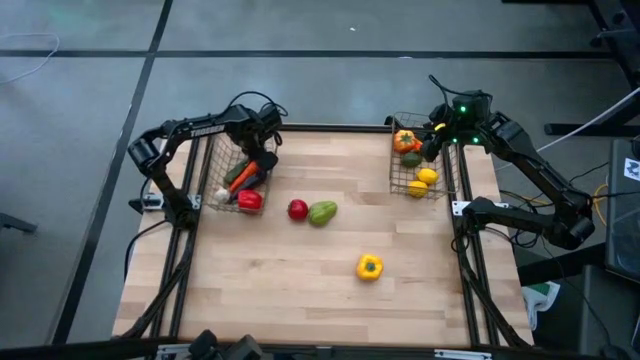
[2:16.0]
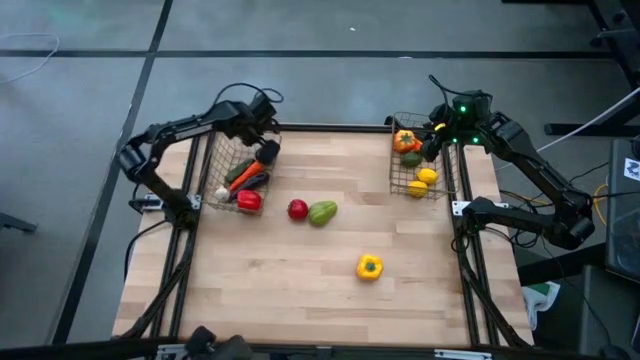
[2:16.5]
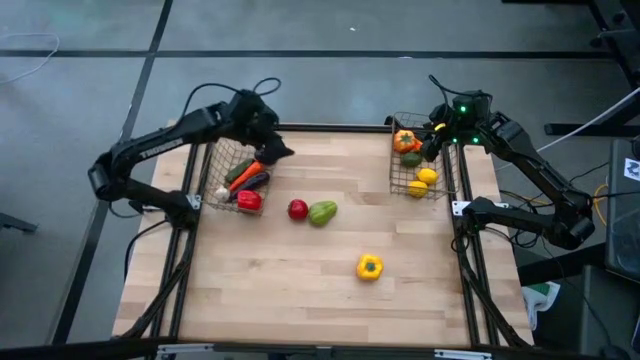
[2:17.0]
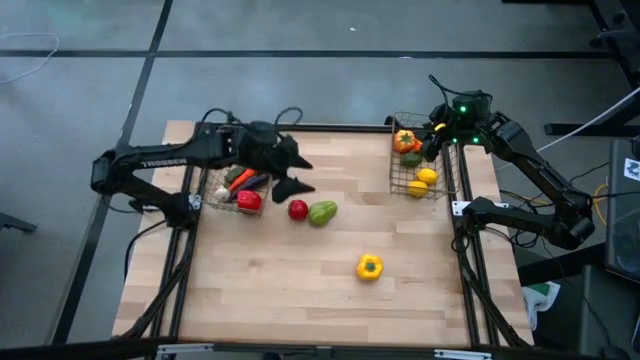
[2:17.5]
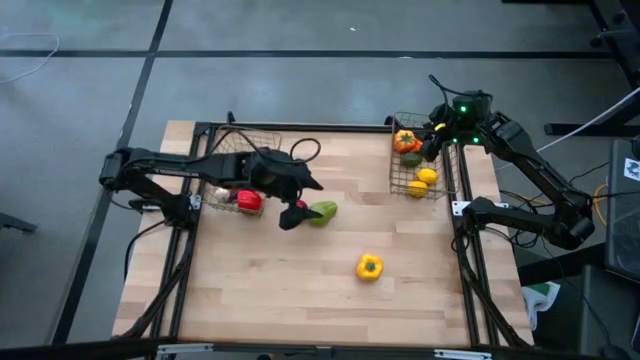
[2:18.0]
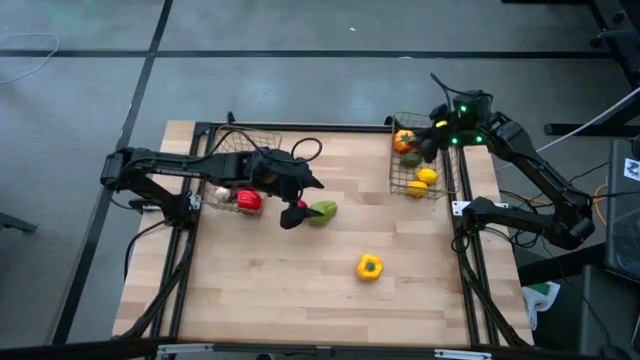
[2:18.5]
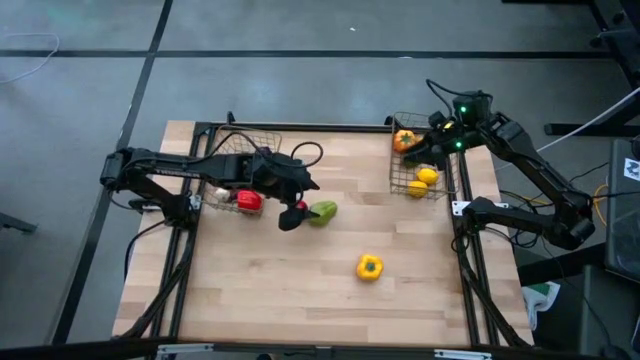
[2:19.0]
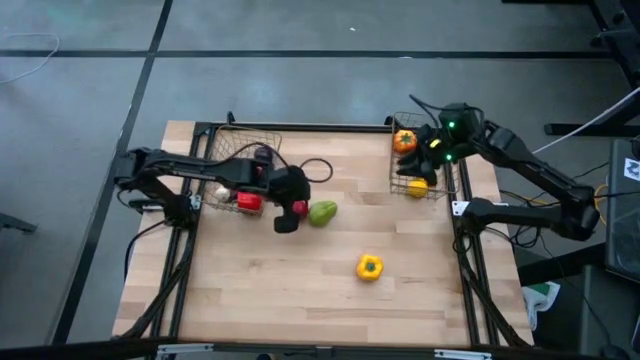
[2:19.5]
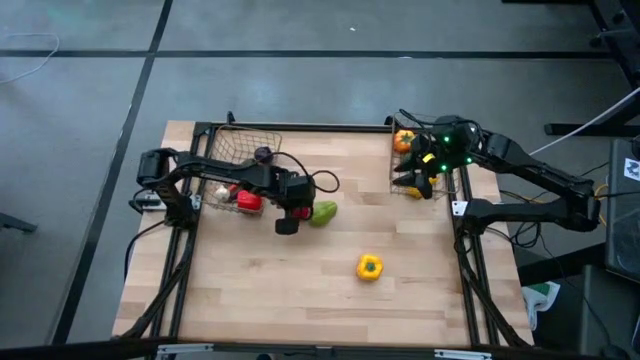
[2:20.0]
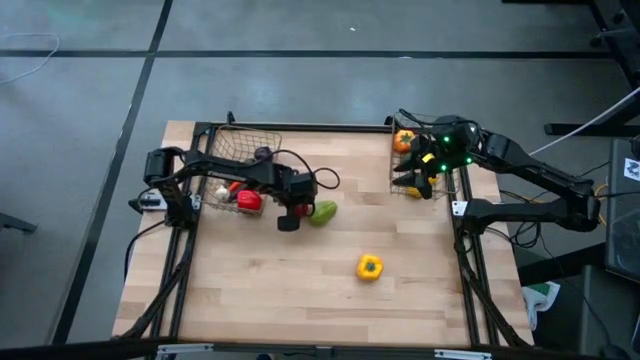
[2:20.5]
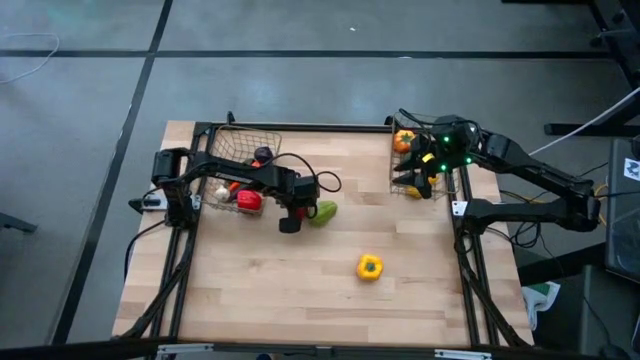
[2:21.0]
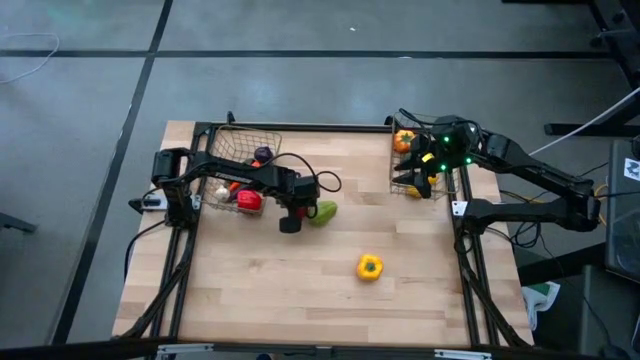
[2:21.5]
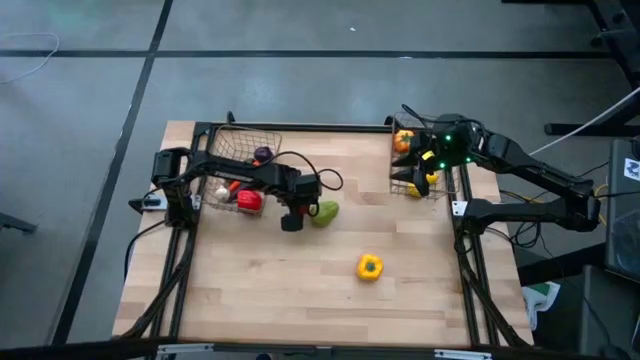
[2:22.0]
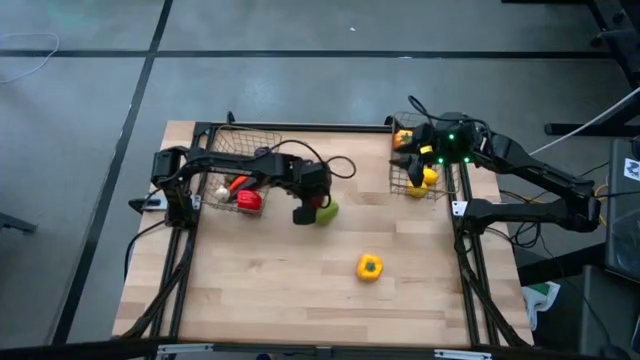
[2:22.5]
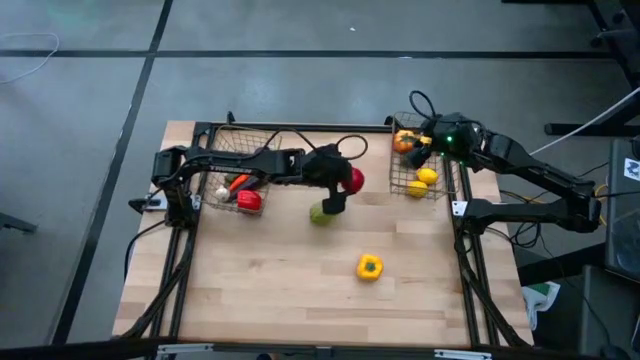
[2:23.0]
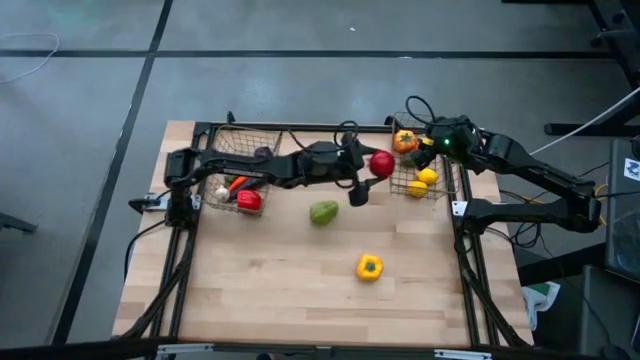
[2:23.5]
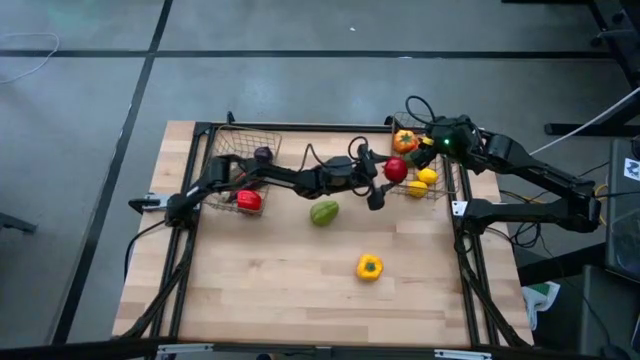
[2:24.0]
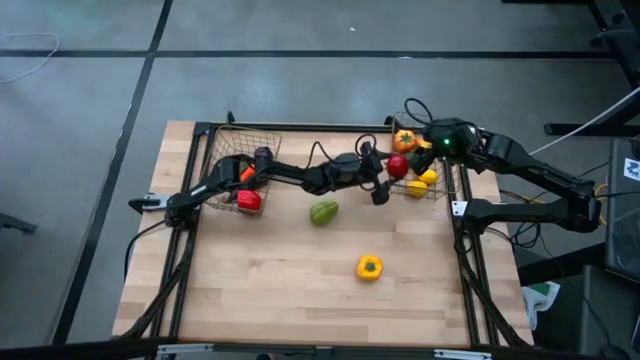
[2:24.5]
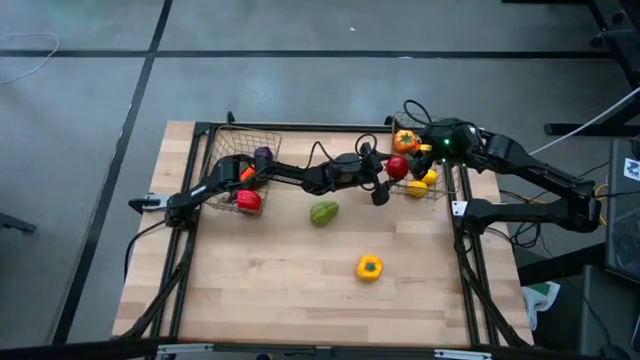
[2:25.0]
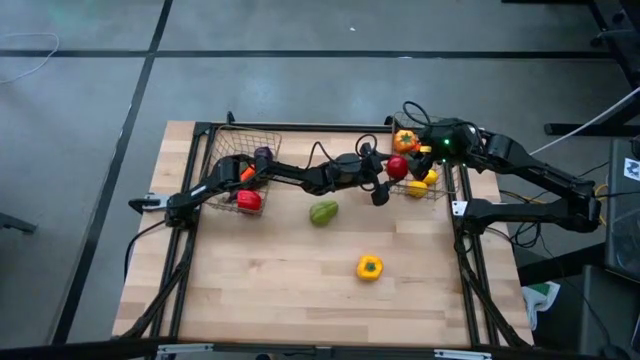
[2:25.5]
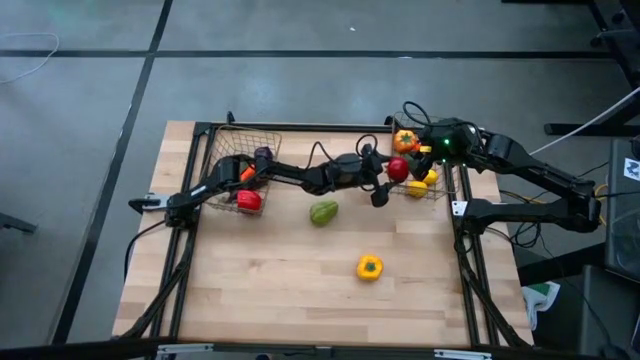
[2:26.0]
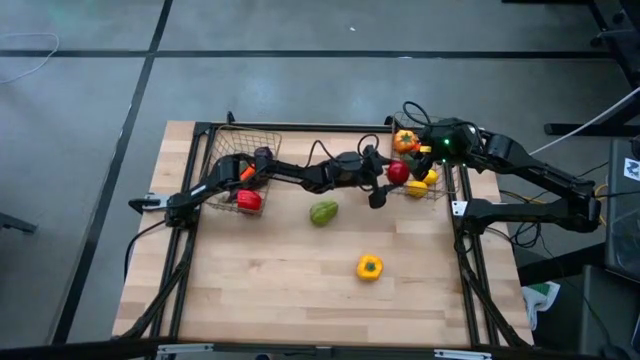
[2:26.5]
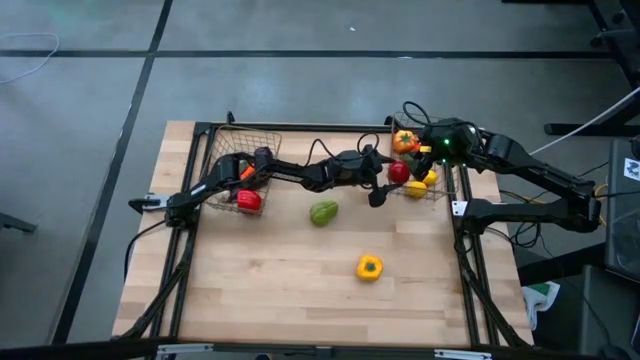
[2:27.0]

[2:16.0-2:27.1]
Task: Sort produce into baskets
Put the red tomato into the right gold wire basket

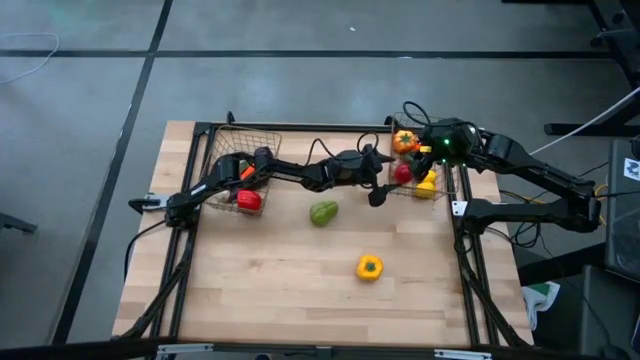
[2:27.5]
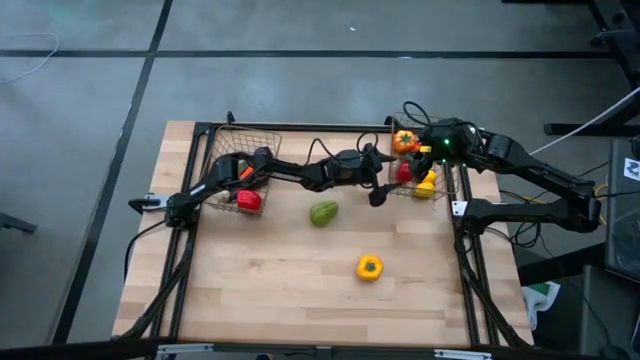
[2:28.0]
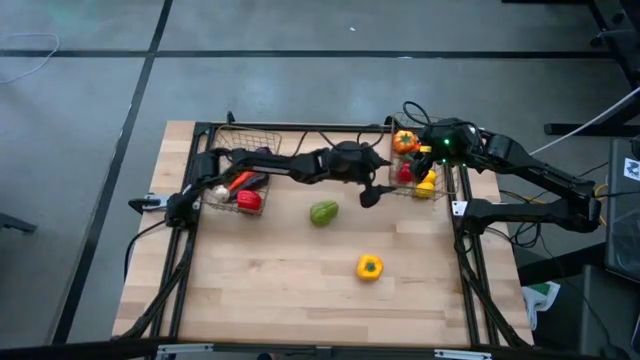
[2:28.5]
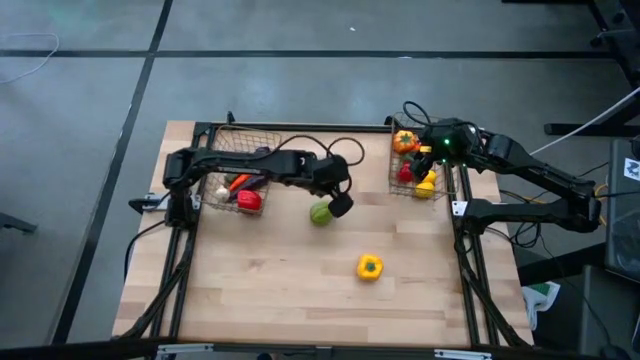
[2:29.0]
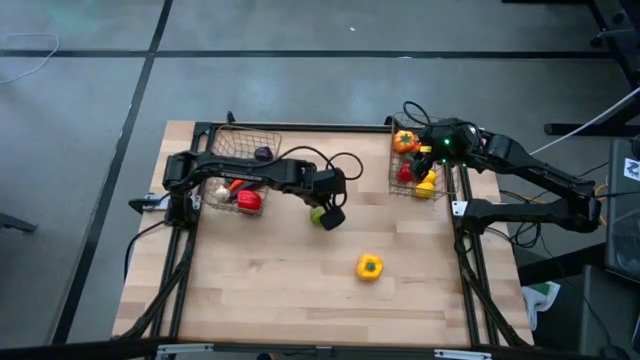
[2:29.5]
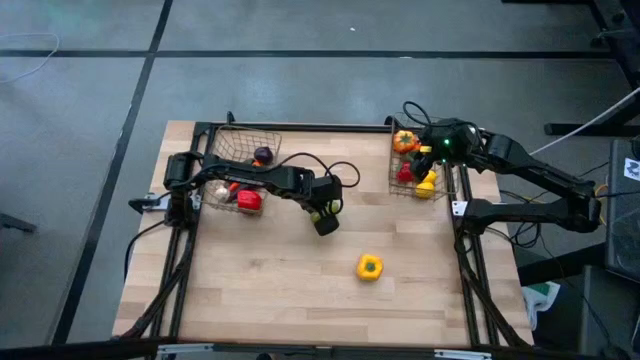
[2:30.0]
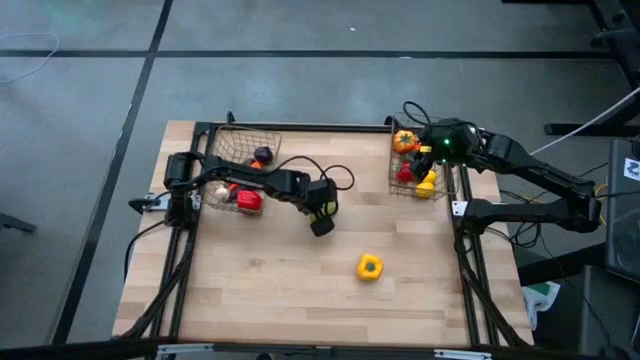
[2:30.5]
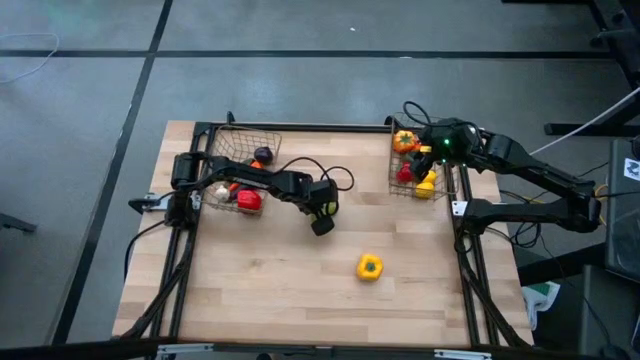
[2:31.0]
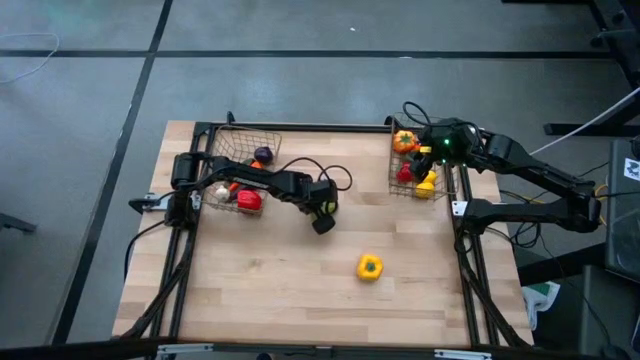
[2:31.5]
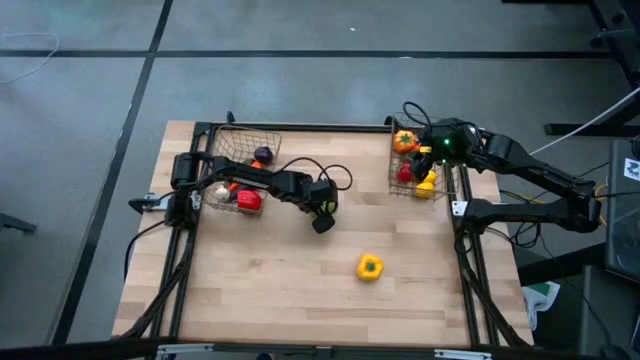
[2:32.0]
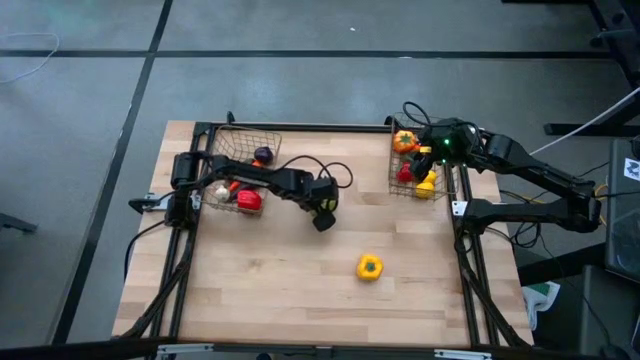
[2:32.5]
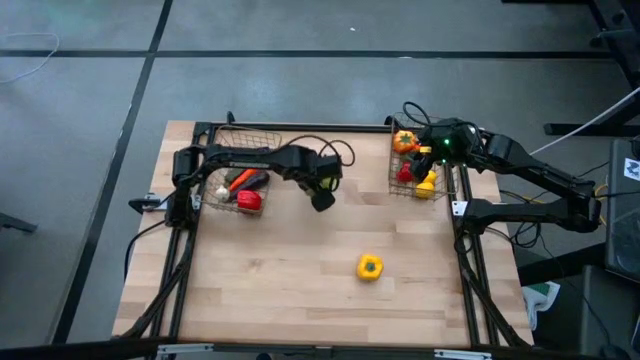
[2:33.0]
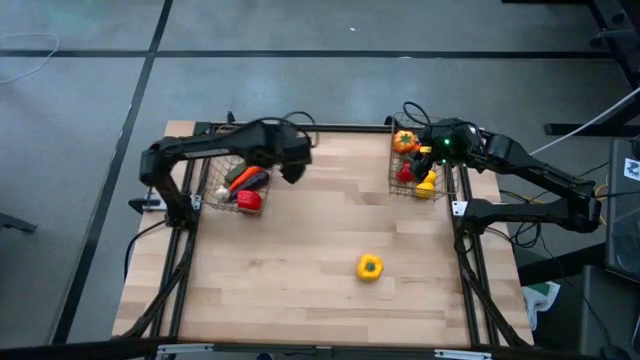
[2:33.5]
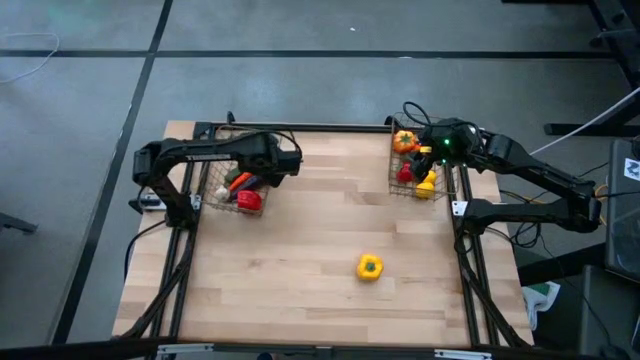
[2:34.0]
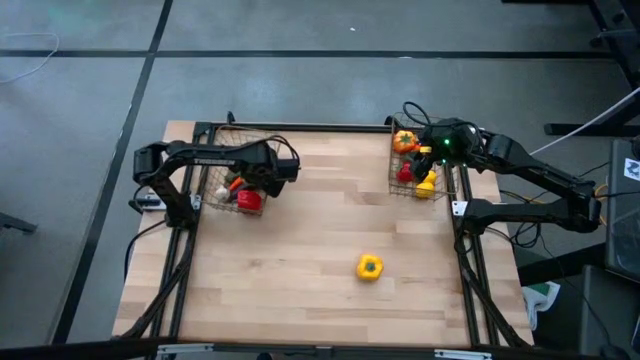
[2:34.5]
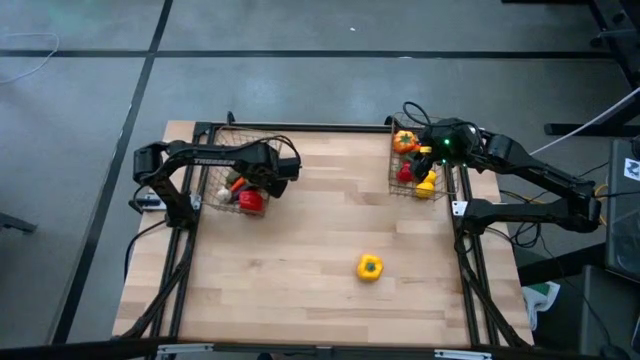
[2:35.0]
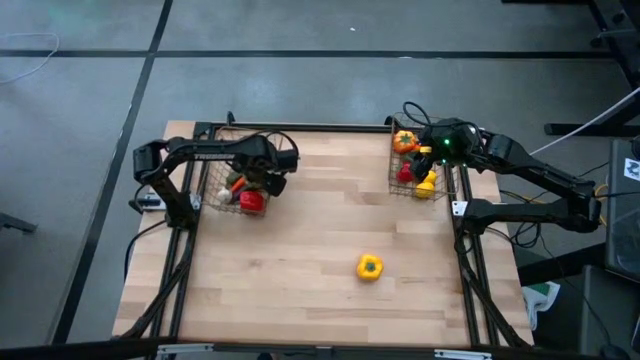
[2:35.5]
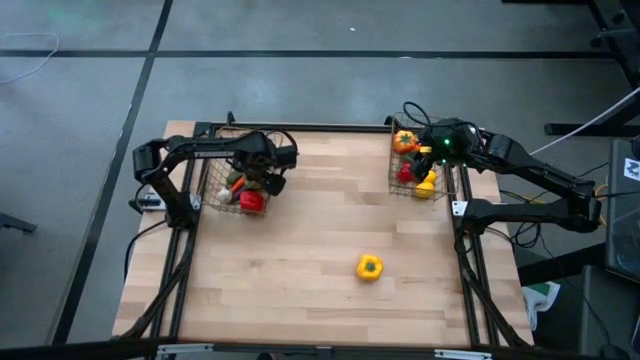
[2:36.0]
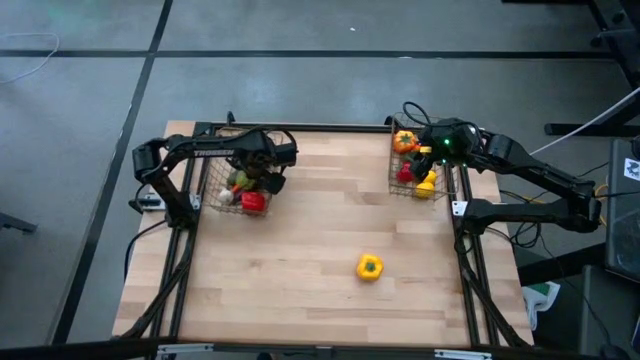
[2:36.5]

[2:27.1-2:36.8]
Put the green chayote into the left gold wire basket
